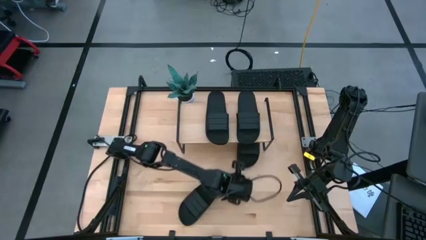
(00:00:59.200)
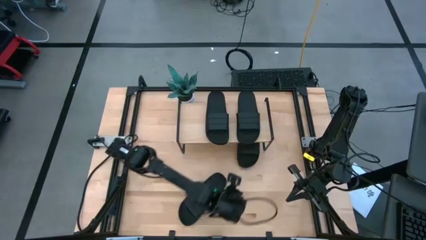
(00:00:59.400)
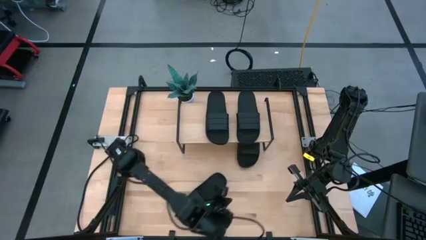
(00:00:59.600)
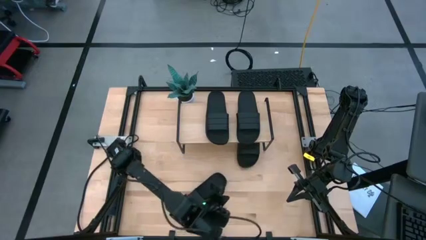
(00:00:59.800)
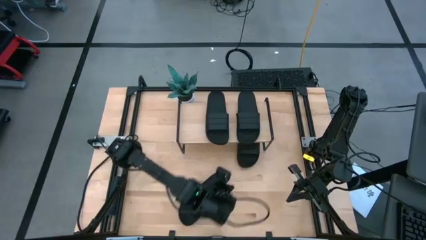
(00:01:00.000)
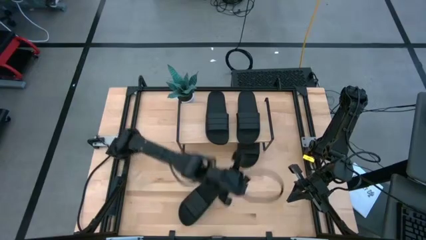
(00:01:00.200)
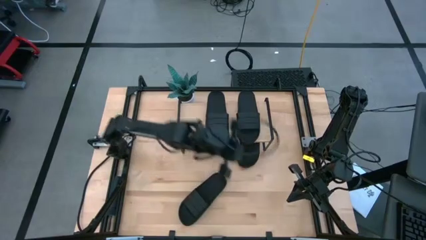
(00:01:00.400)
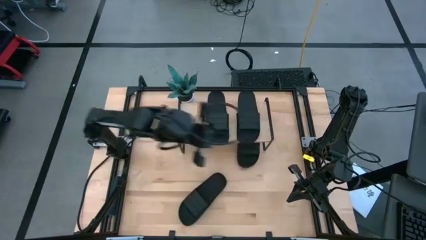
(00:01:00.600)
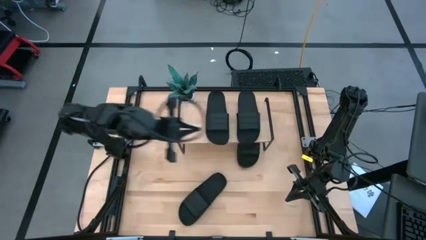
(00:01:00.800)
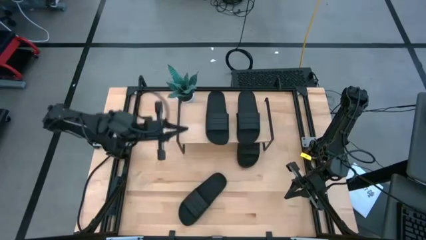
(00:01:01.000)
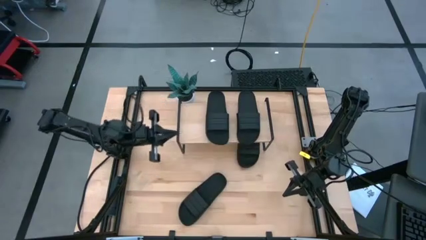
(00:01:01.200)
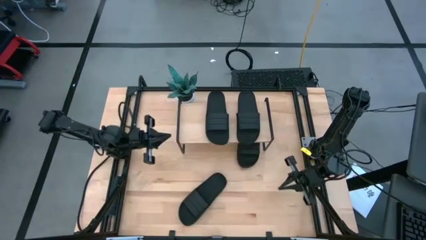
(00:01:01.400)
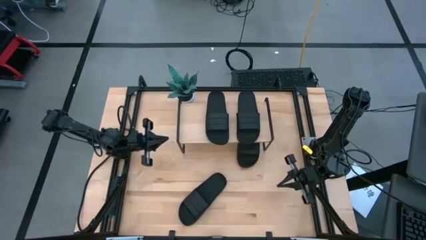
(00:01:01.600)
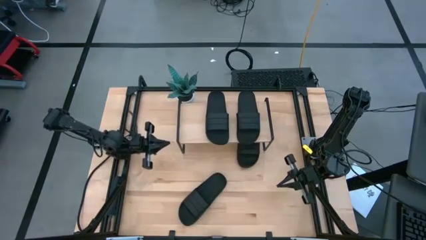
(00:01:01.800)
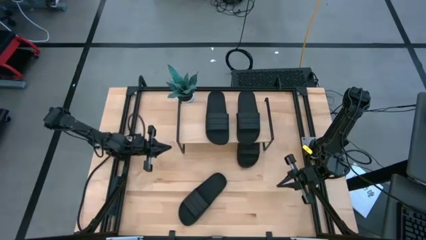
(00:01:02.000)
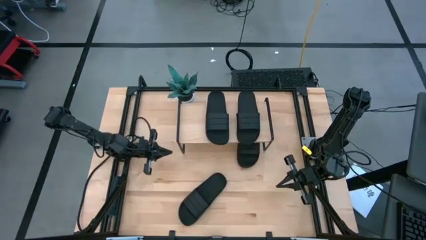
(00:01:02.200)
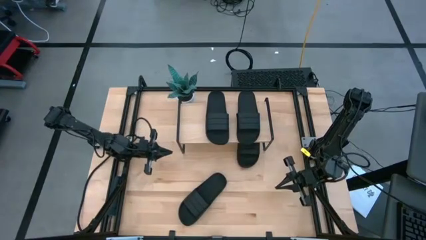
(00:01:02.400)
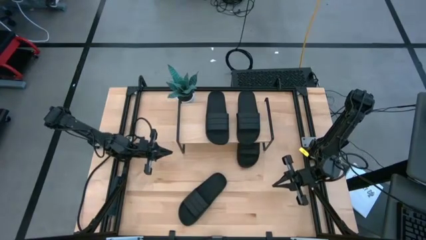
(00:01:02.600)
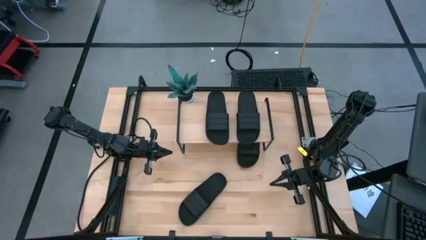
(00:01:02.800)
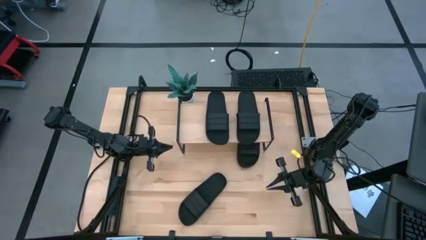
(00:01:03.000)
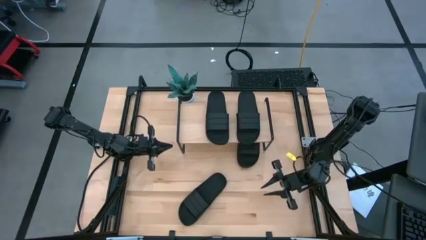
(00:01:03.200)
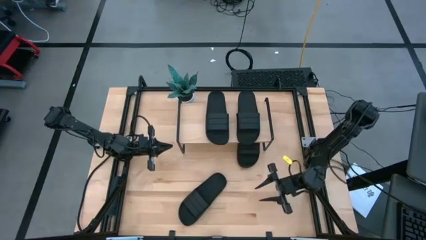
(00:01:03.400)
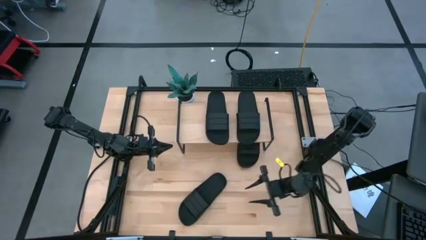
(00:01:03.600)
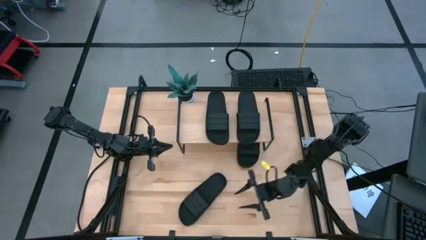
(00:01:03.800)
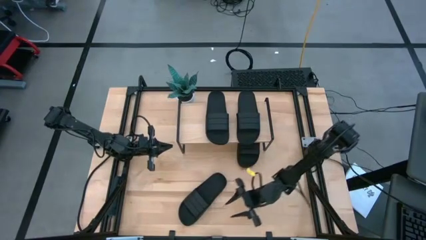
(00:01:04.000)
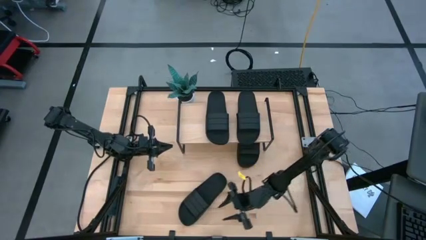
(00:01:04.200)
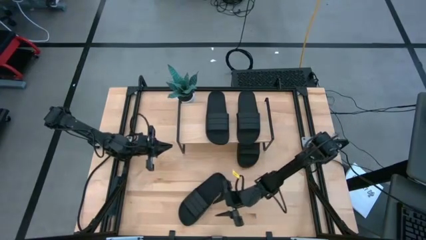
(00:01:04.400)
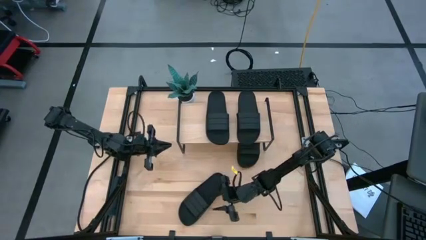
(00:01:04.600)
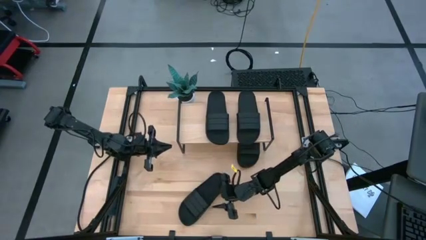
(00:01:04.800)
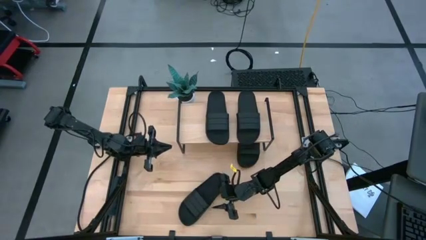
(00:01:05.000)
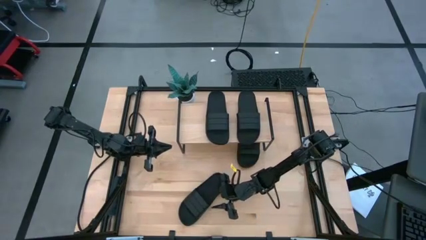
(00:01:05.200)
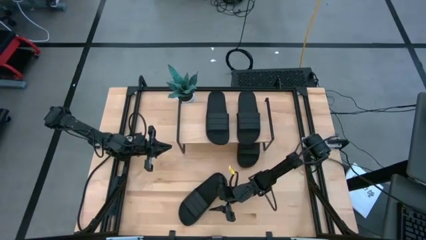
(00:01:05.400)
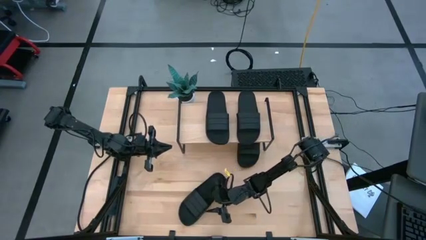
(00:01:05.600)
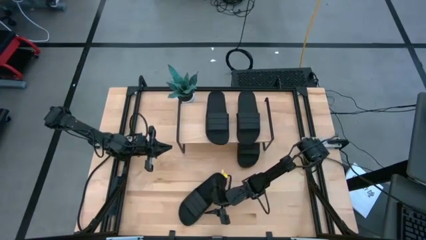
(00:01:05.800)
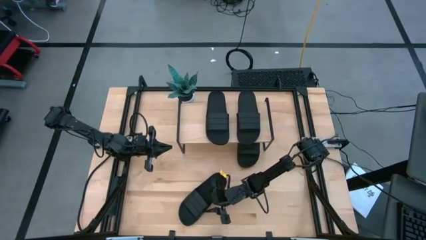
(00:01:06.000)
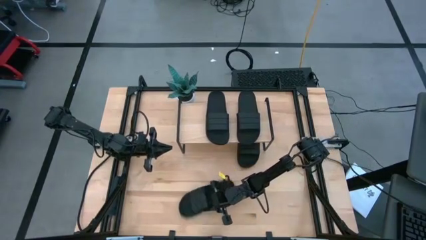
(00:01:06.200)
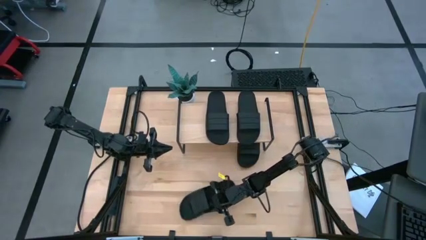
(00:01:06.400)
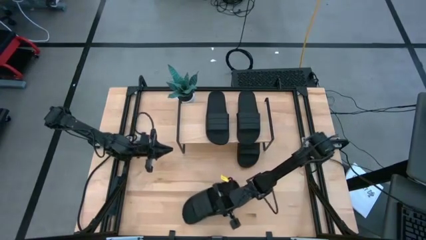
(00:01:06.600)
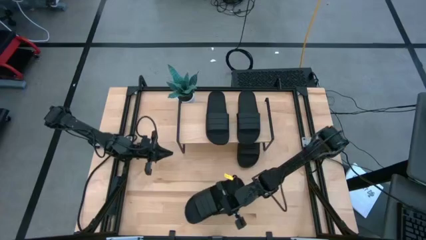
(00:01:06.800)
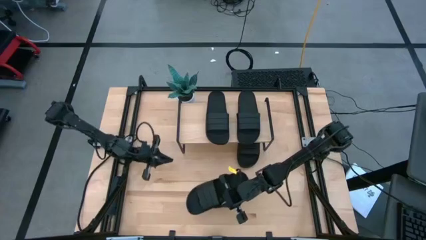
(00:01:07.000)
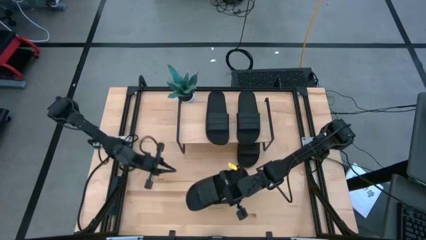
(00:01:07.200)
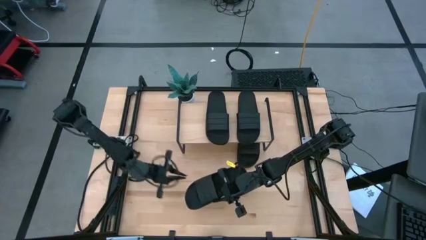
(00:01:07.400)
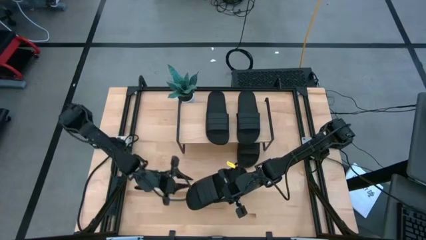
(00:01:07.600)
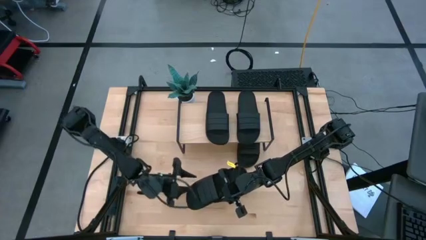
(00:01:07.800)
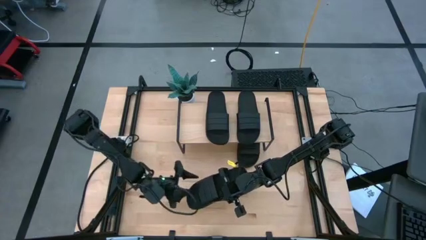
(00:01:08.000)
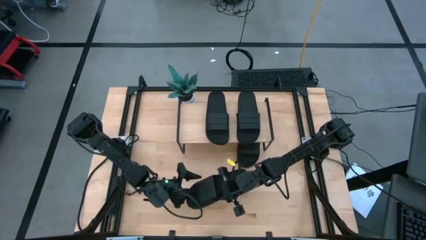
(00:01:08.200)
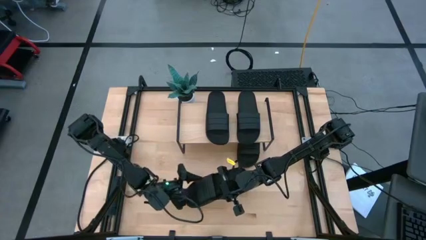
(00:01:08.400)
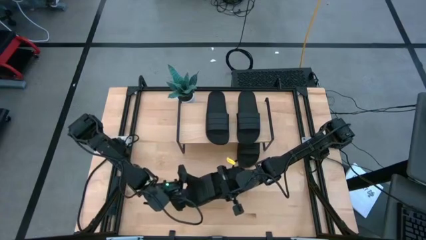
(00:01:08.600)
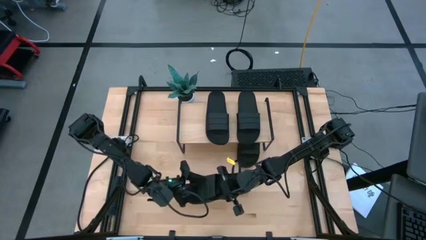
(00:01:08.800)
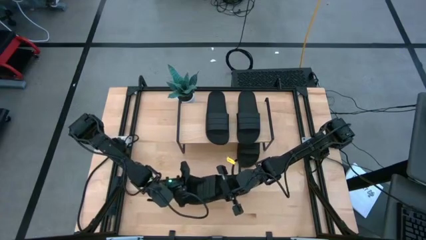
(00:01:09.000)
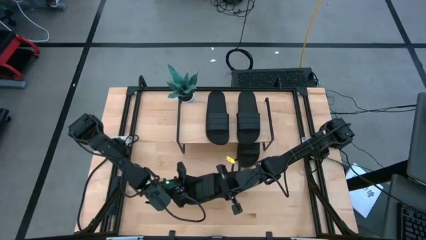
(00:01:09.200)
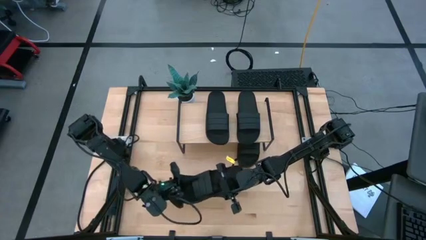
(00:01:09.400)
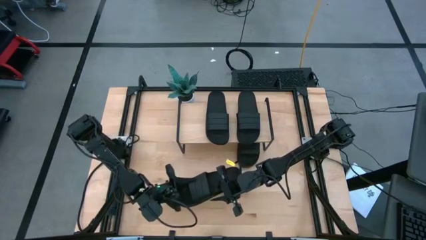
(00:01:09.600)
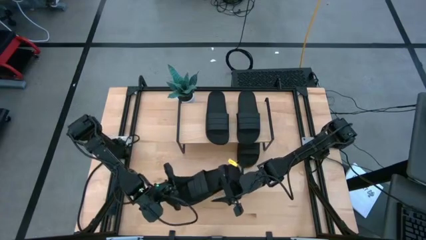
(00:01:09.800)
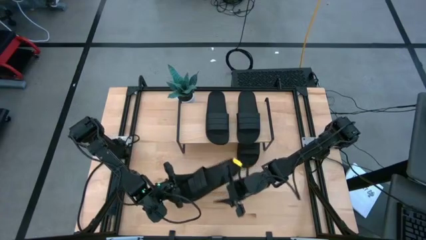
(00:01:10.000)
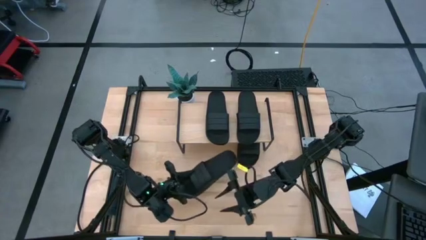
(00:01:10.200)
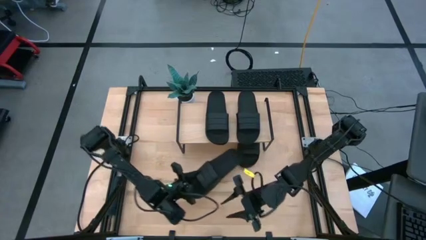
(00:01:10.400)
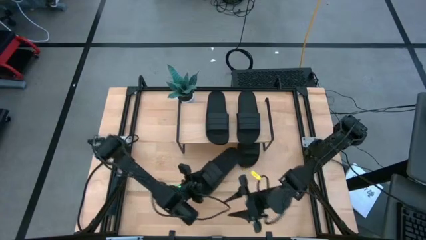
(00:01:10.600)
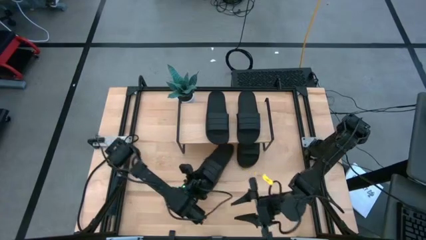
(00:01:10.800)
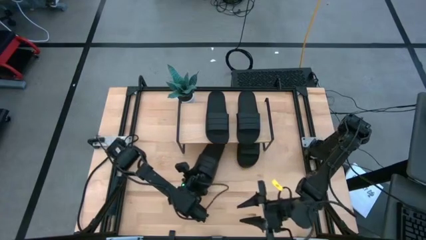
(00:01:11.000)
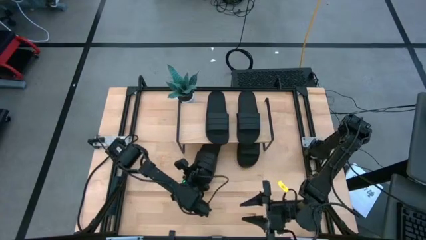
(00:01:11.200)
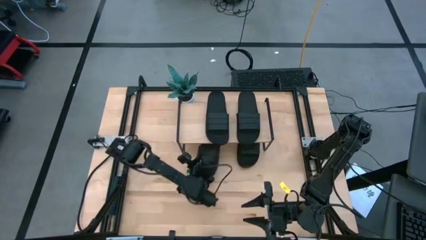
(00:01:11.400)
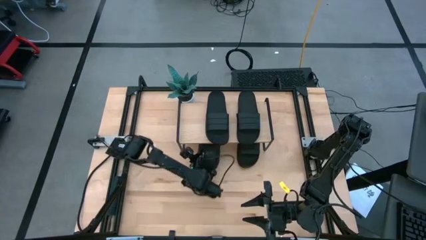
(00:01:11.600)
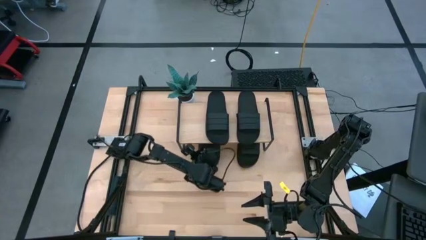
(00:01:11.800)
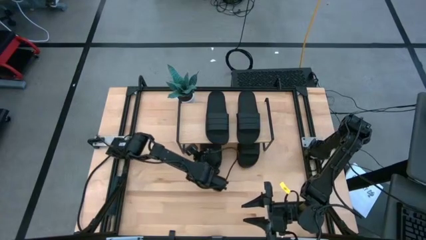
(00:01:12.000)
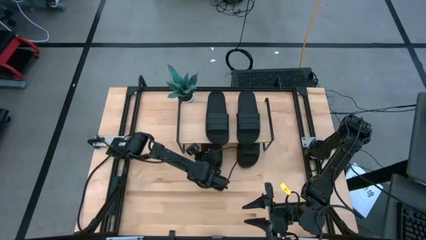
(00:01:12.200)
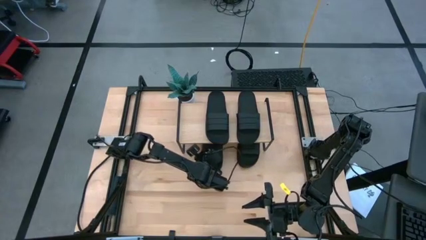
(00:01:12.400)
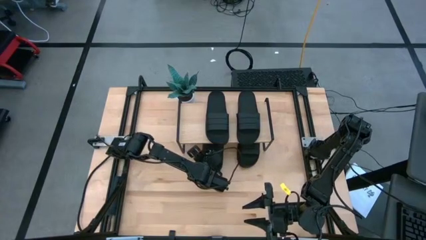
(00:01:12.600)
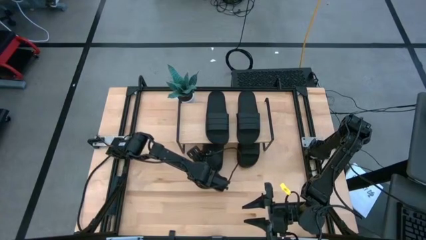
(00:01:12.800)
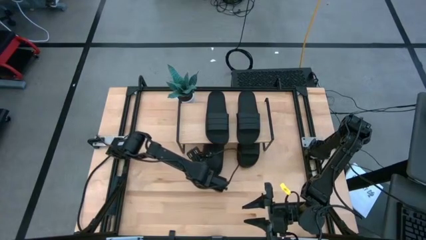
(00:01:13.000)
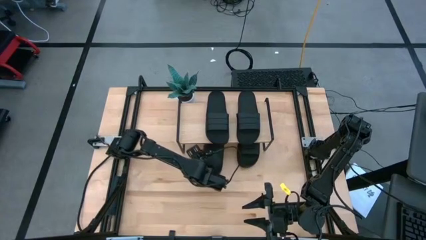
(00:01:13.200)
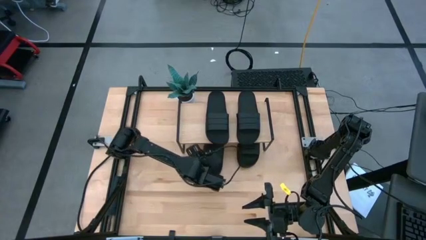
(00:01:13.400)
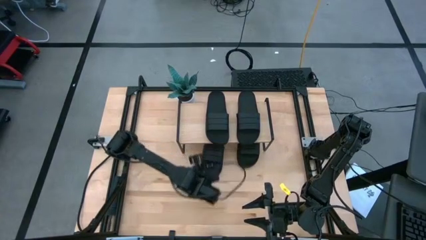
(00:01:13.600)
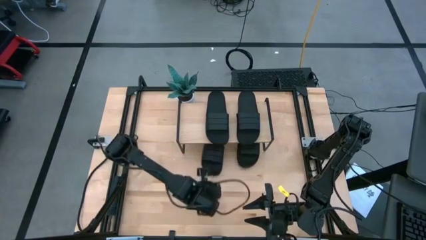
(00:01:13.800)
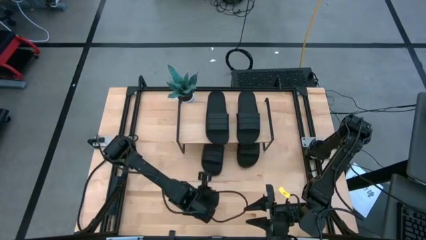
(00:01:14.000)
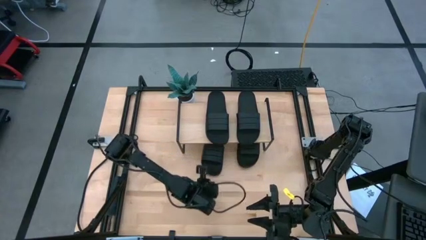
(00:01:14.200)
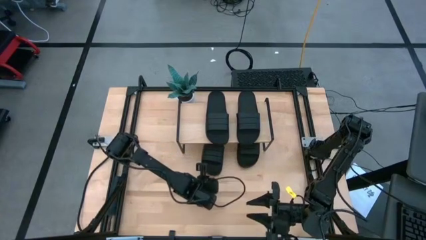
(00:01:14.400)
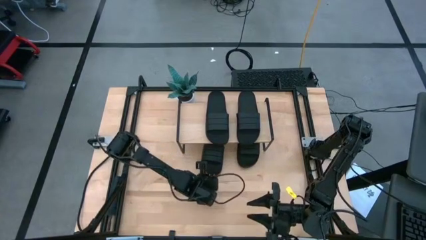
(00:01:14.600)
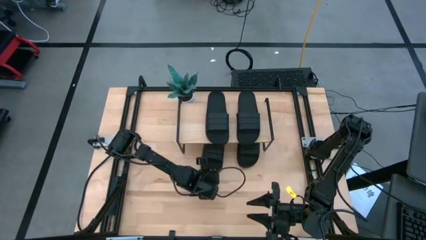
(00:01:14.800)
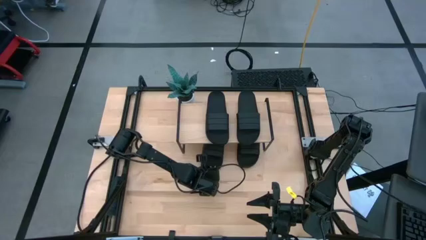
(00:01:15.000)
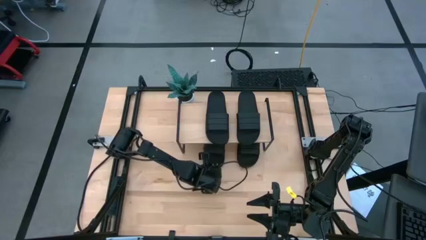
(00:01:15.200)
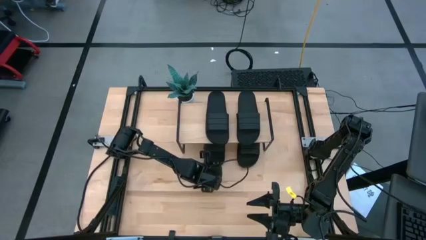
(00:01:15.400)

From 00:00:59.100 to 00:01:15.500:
Task: Pick and place slides into the shelf
Put the slide under the shelf
